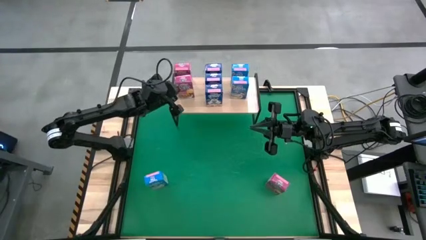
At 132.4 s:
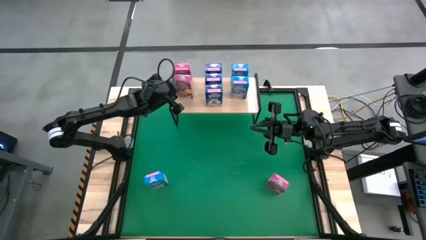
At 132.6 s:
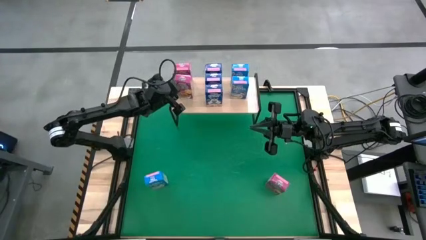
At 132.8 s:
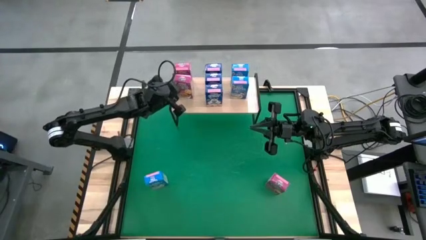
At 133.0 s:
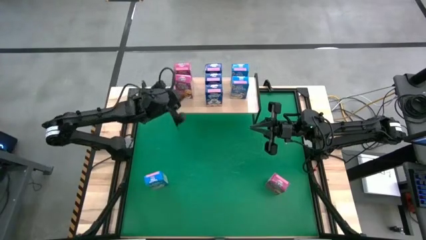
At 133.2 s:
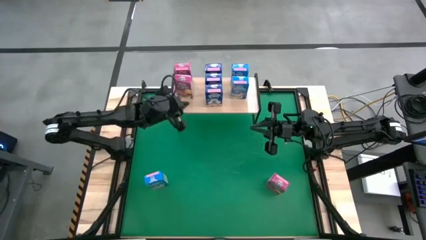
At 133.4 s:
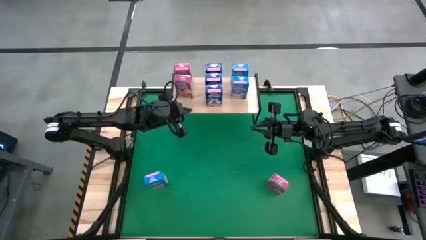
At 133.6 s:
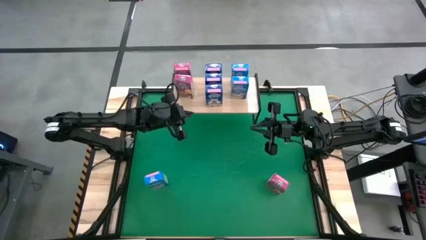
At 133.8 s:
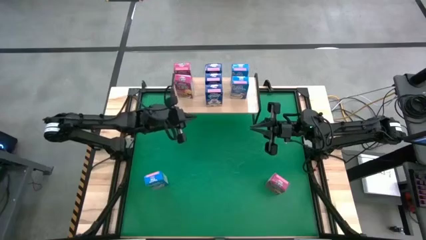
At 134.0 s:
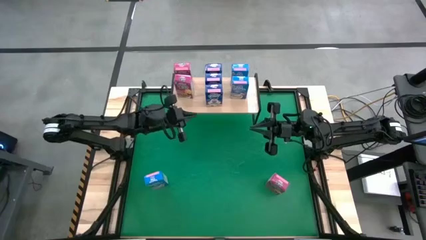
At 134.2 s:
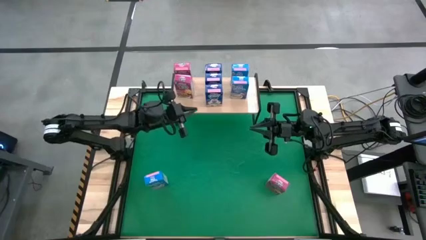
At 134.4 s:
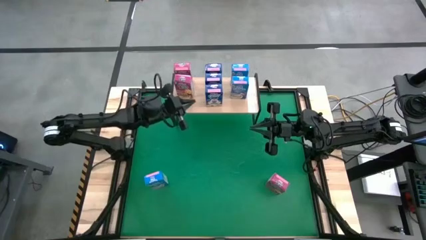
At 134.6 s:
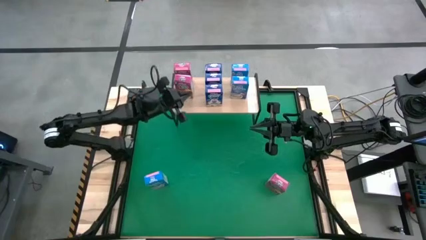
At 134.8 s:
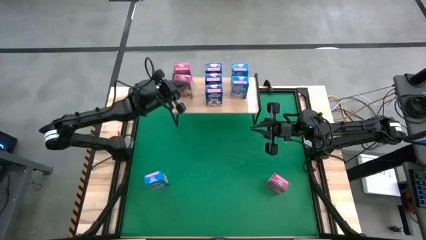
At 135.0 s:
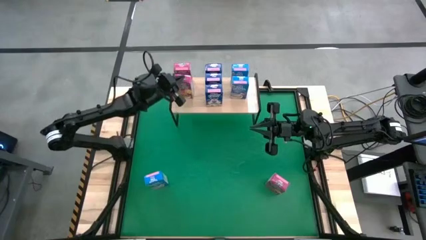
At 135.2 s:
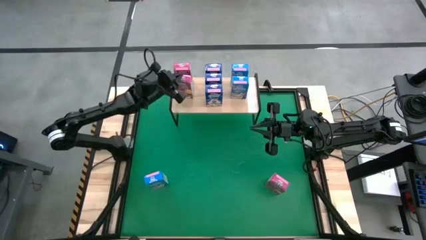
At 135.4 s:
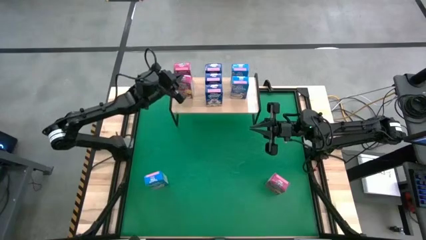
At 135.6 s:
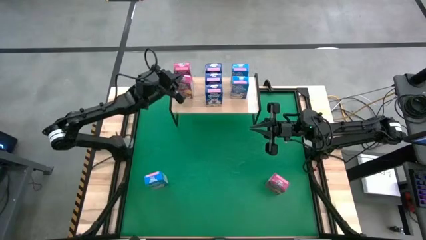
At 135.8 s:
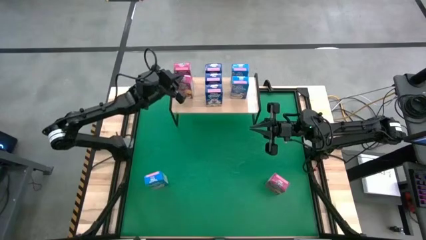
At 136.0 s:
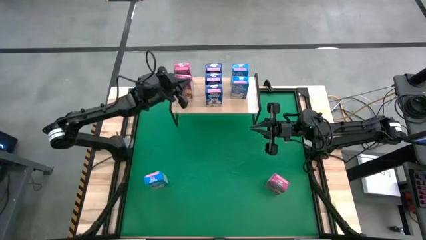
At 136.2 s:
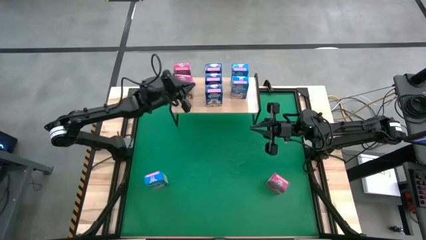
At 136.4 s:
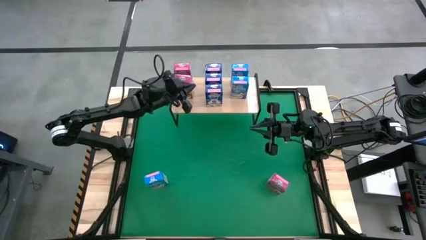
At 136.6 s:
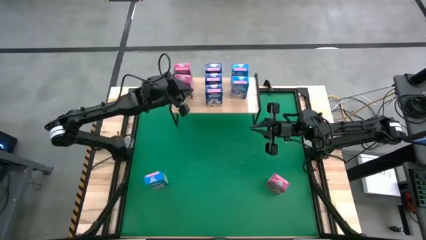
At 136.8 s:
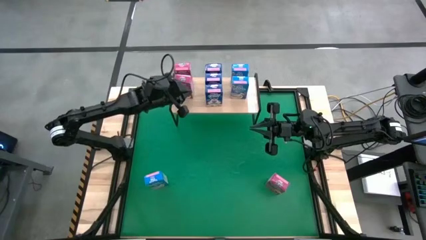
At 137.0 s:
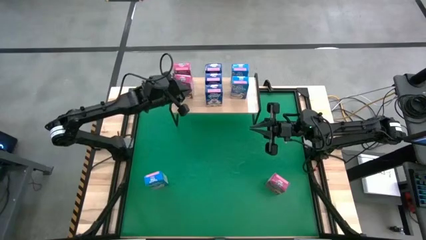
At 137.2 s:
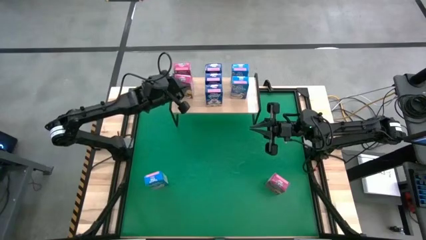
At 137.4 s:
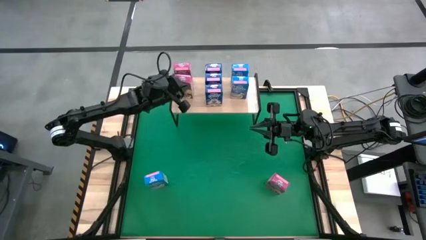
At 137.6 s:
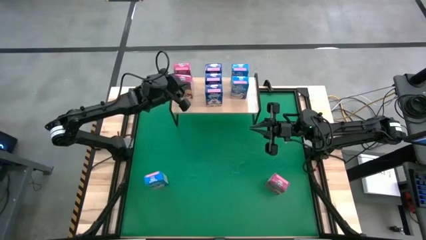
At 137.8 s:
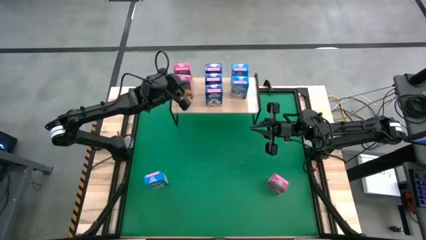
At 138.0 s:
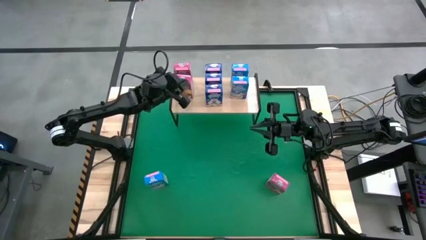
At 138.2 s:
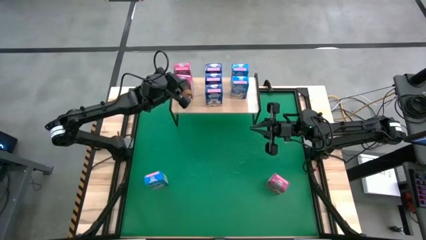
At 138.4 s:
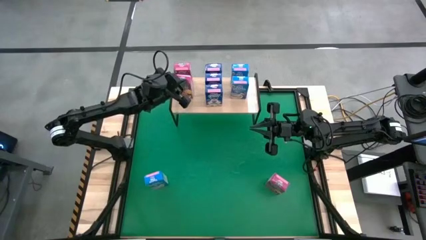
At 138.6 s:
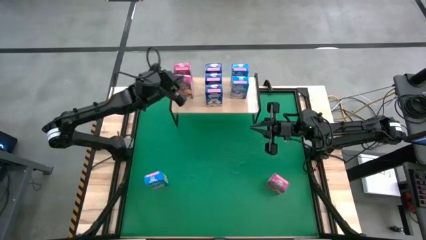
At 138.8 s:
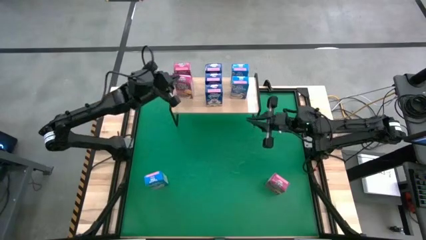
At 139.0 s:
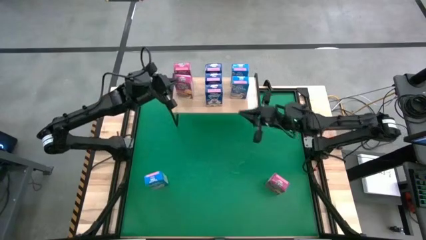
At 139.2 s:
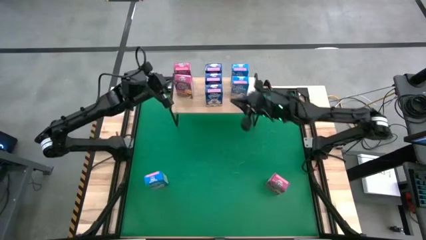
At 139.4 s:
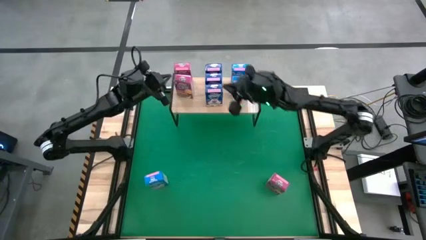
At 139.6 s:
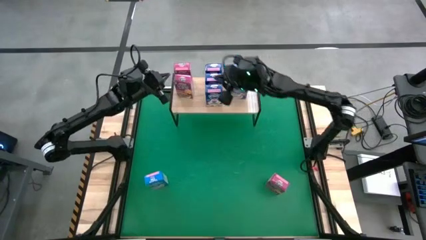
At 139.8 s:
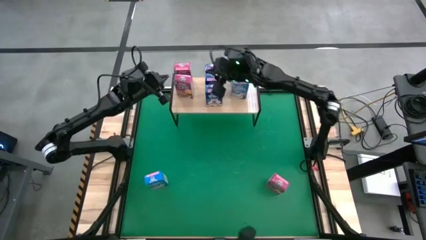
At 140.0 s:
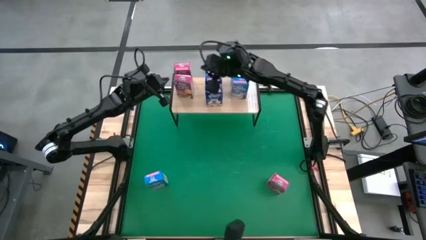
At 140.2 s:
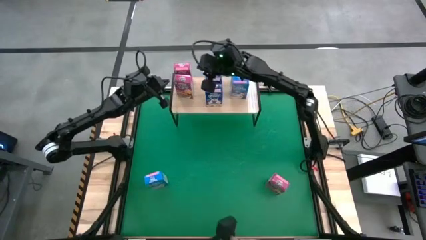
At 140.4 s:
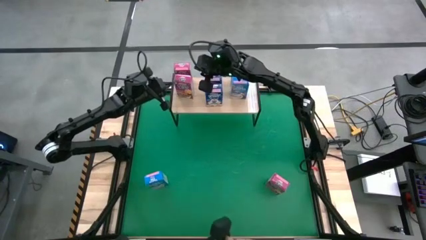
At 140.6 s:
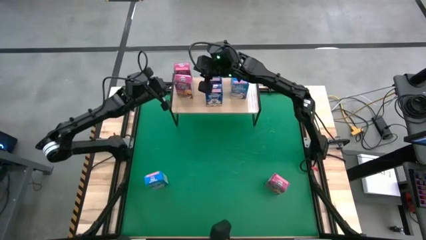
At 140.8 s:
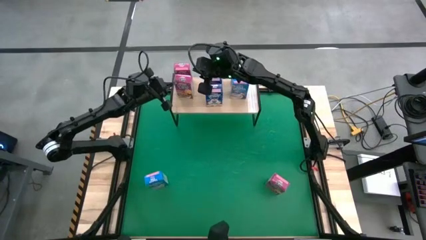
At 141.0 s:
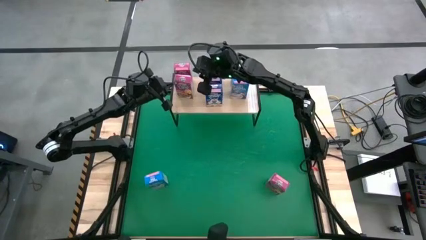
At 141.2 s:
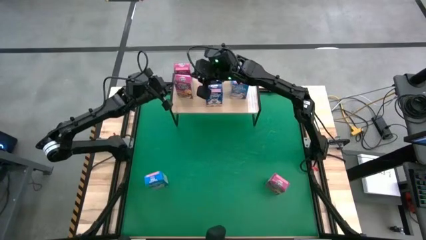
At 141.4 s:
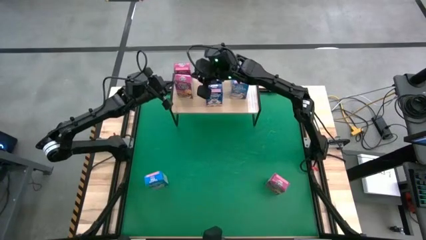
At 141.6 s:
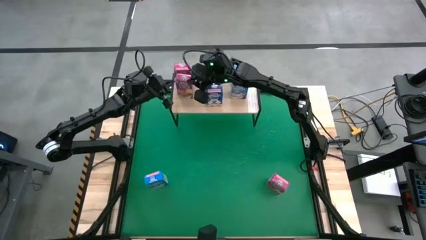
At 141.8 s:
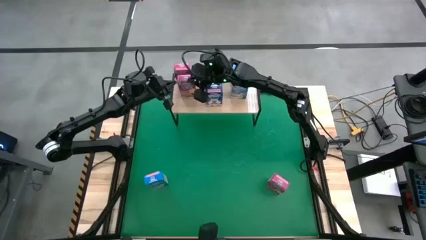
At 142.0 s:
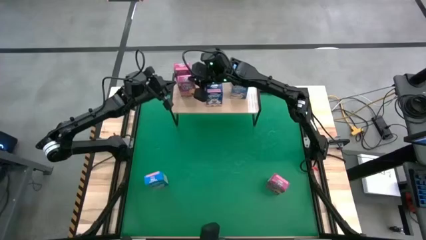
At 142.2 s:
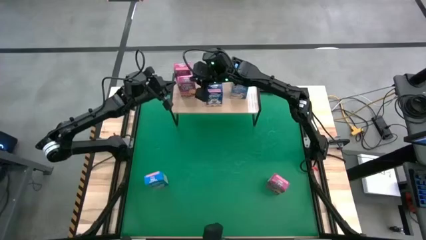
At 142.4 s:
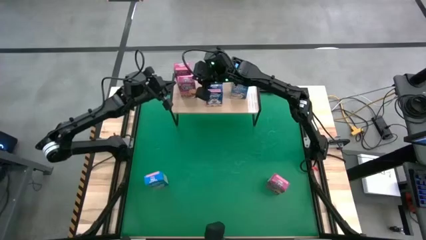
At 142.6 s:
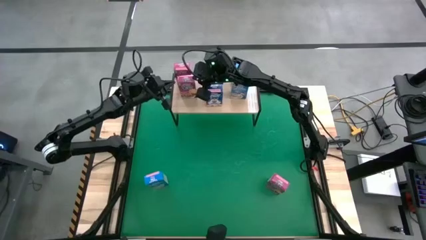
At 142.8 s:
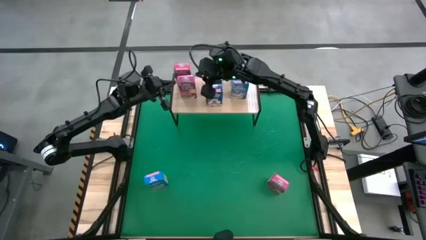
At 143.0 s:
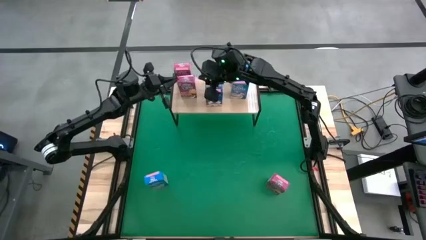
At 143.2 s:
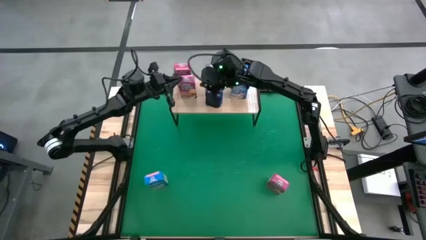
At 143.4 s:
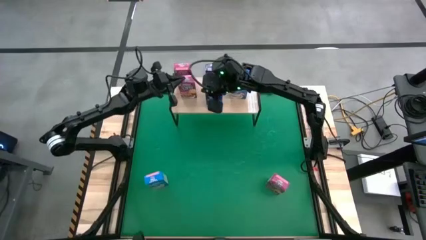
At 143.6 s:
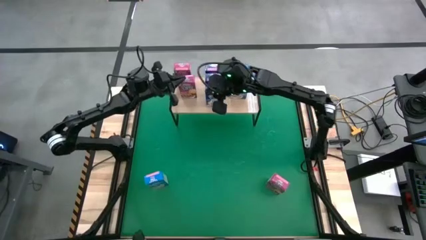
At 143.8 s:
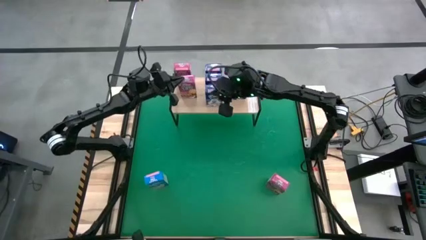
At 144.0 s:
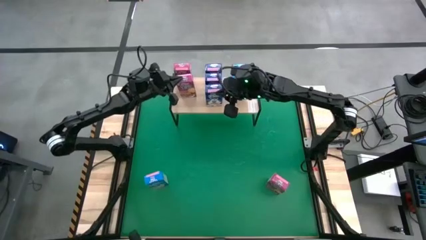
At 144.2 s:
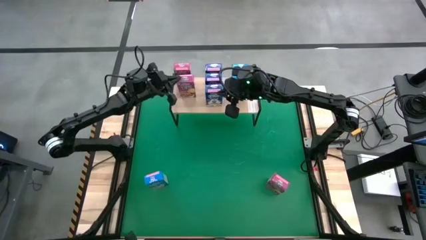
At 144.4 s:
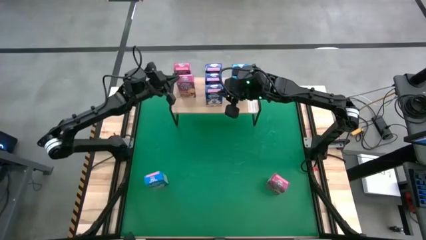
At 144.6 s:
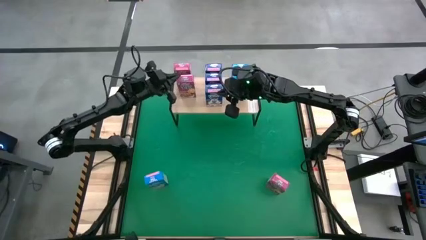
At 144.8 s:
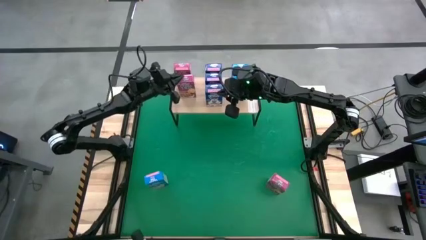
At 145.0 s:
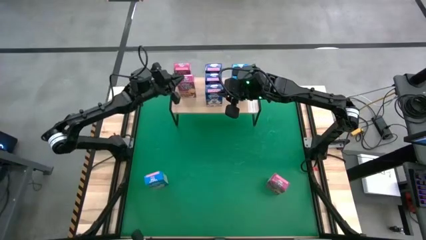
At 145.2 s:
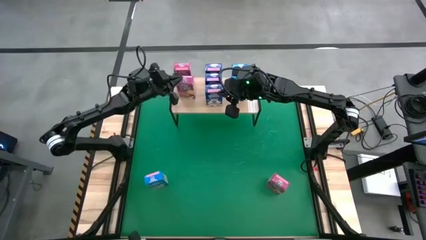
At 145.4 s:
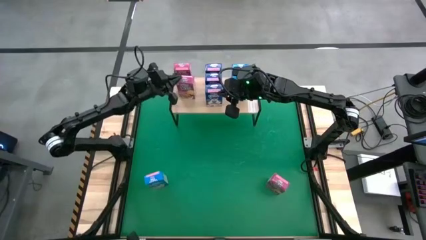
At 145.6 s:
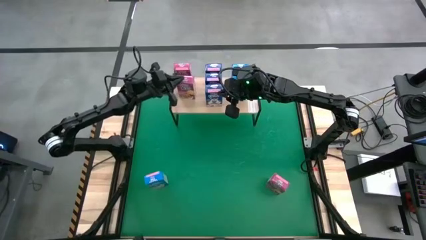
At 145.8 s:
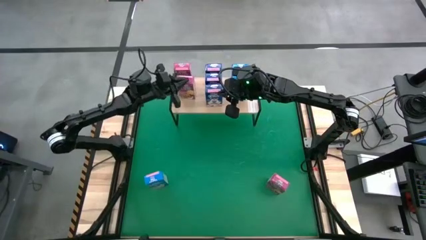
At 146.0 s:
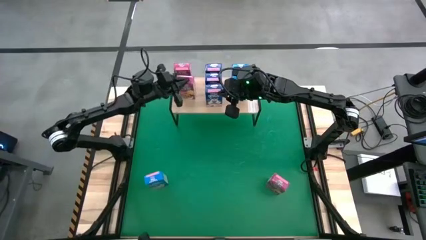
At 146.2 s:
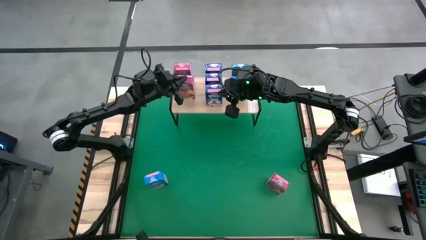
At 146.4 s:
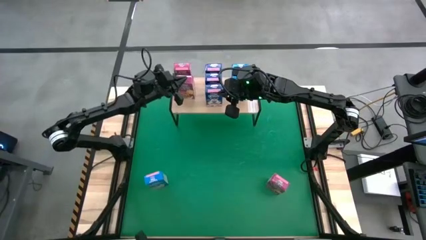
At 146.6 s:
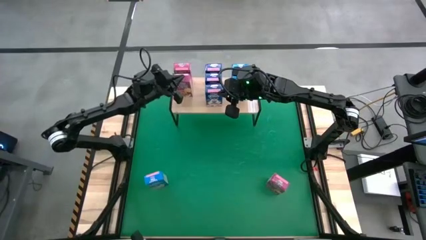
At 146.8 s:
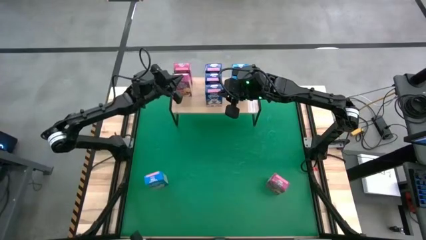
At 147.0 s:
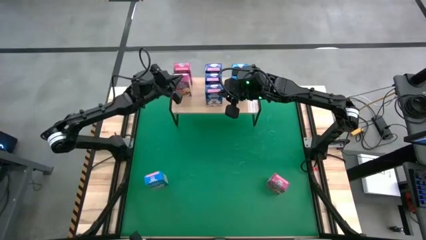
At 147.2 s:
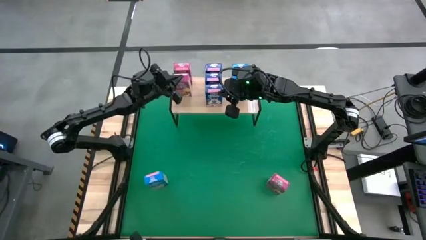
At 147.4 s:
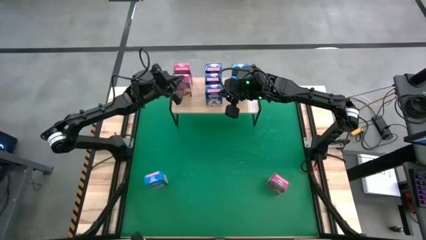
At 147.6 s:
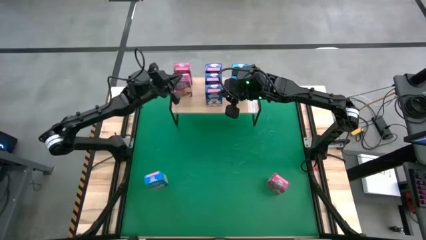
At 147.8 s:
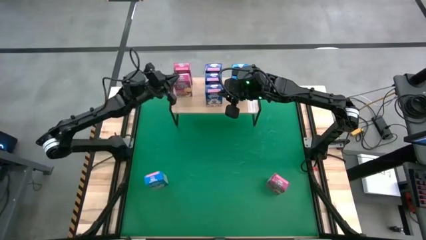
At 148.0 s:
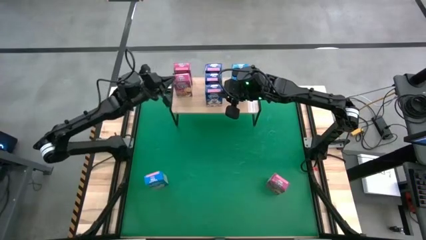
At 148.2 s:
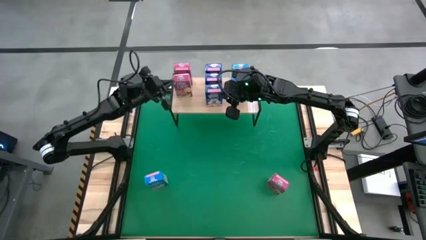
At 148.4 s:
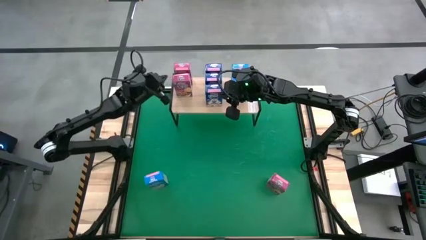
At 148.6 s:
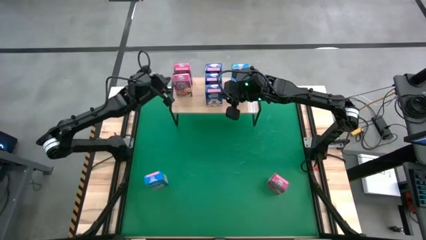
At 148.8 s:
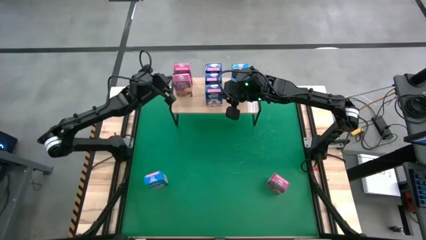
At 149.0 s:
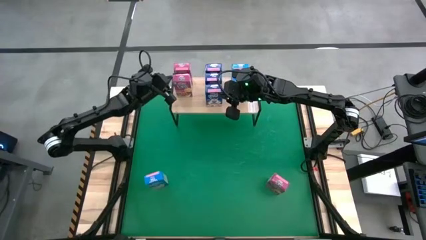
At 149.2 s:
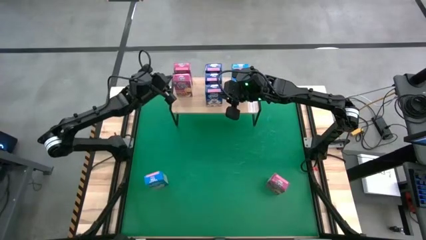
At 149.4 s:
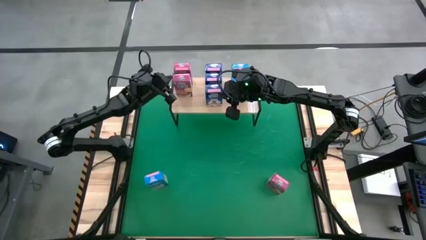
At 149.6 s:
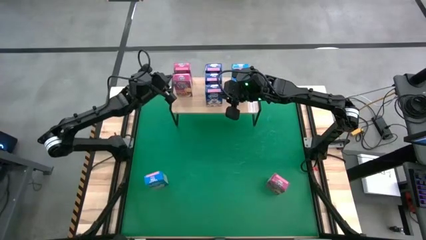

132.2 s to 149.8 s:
Task: Stack cereal on shelf
Put the top violet cereal box on the shelf aligned with the other violet cereal box
